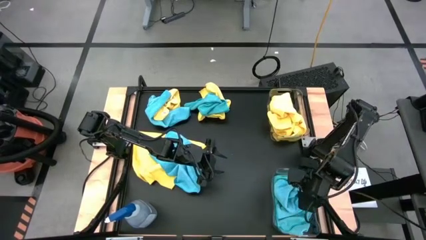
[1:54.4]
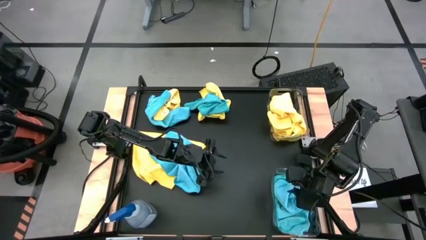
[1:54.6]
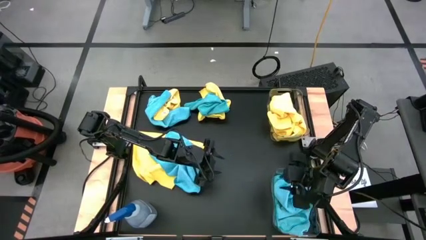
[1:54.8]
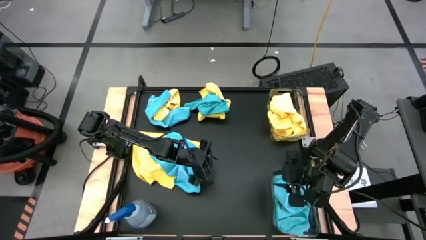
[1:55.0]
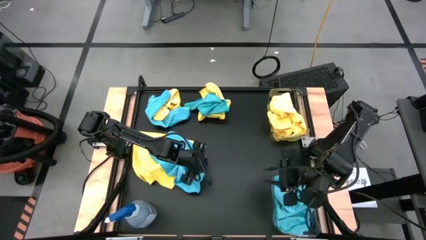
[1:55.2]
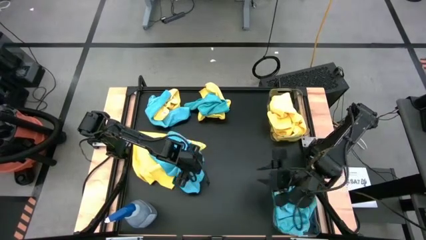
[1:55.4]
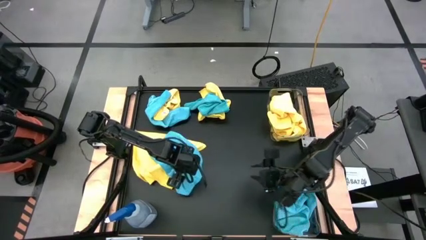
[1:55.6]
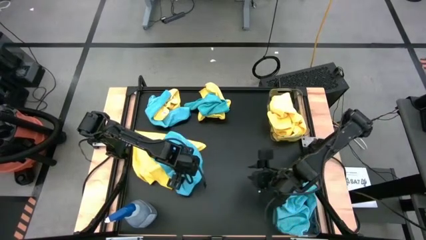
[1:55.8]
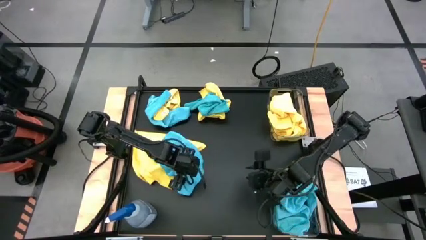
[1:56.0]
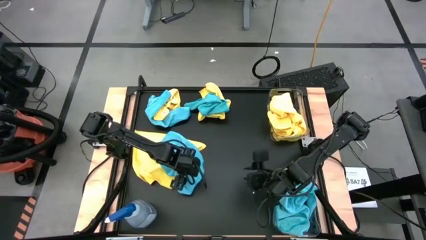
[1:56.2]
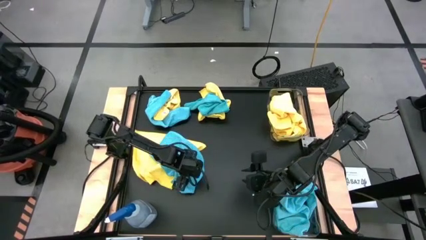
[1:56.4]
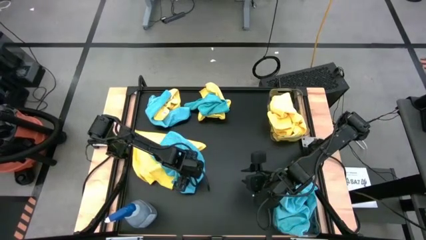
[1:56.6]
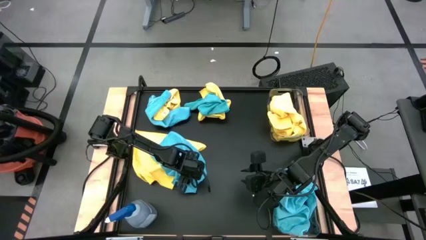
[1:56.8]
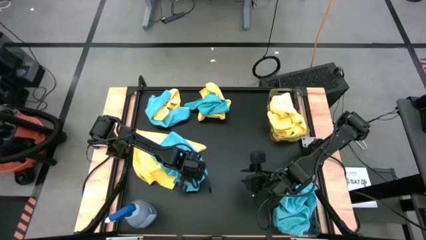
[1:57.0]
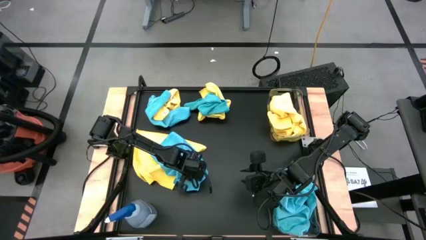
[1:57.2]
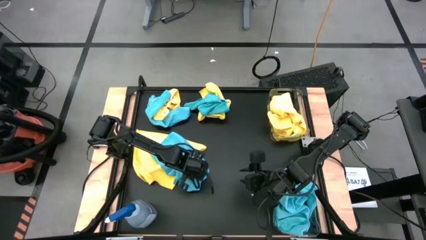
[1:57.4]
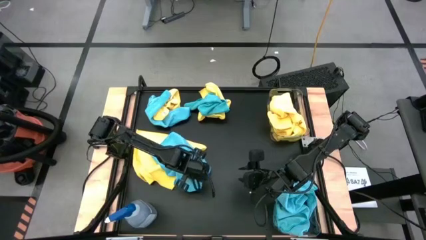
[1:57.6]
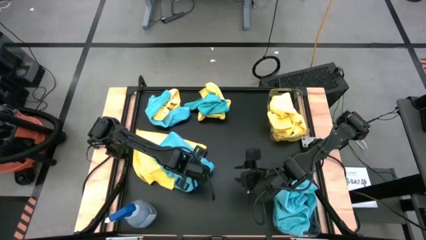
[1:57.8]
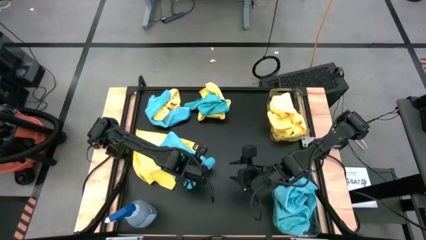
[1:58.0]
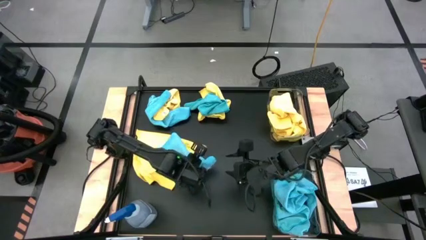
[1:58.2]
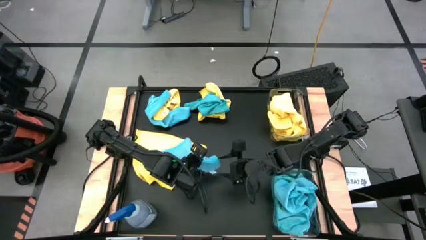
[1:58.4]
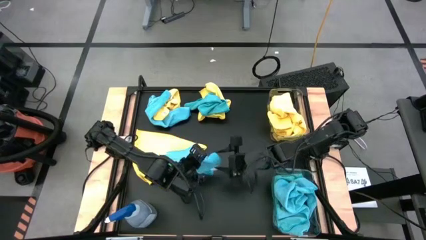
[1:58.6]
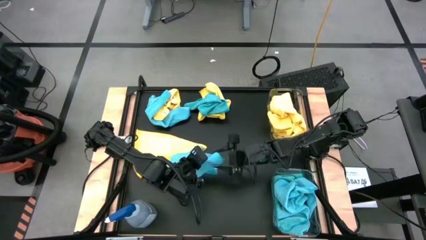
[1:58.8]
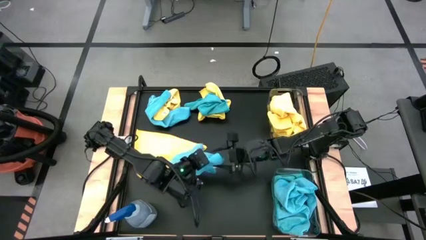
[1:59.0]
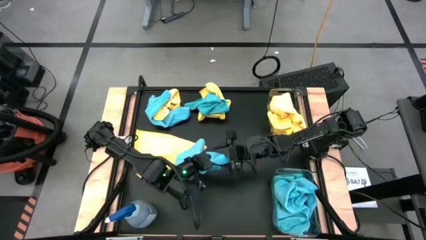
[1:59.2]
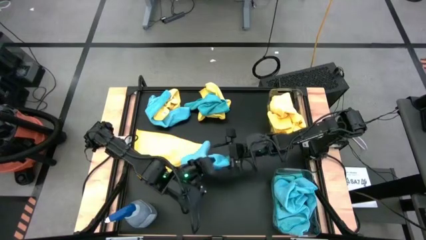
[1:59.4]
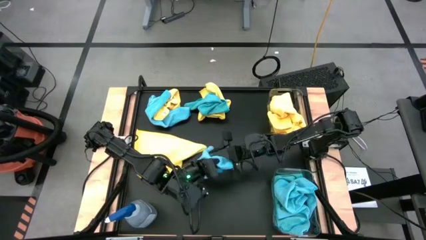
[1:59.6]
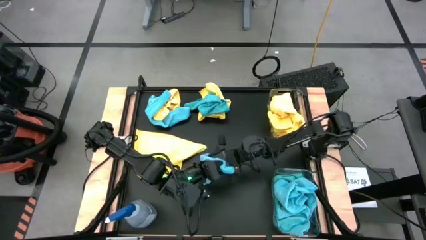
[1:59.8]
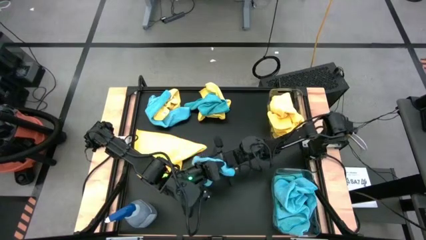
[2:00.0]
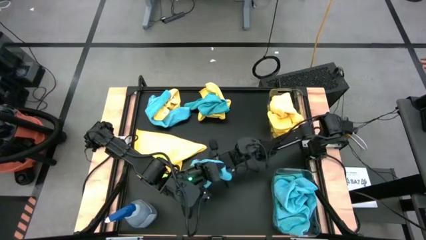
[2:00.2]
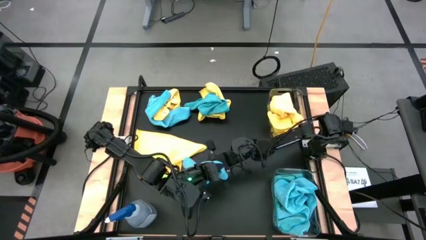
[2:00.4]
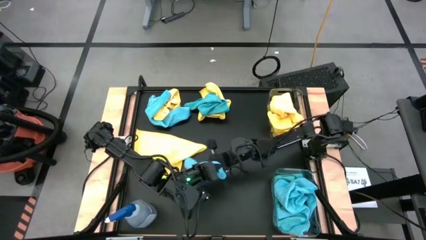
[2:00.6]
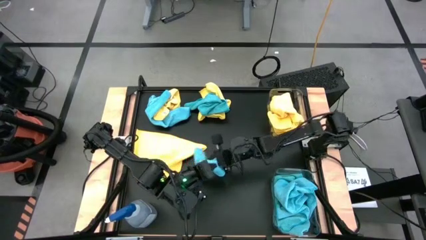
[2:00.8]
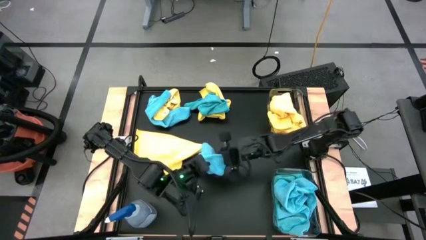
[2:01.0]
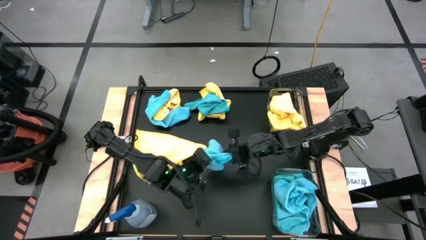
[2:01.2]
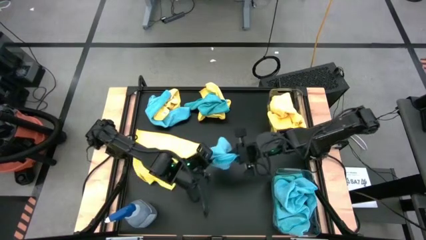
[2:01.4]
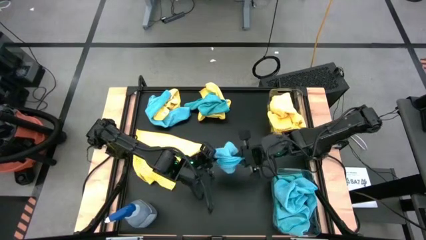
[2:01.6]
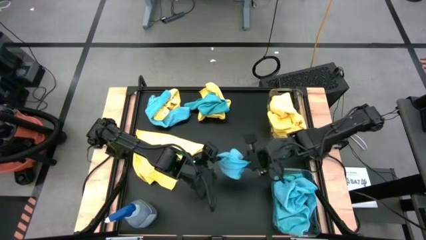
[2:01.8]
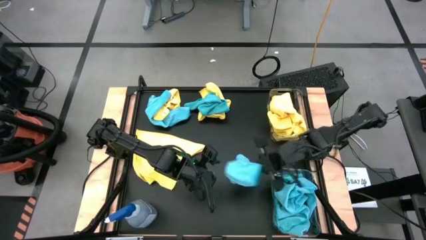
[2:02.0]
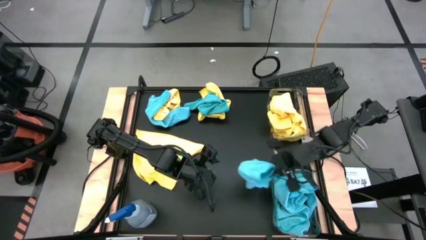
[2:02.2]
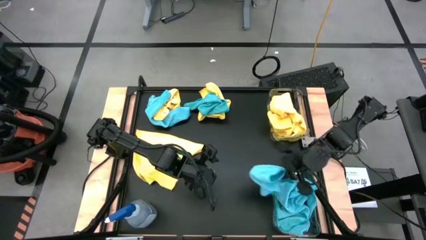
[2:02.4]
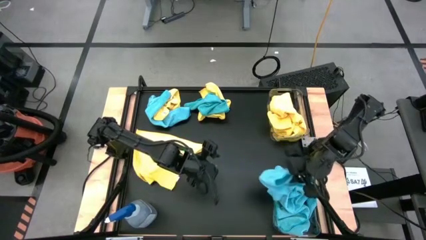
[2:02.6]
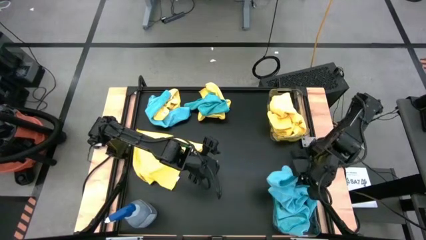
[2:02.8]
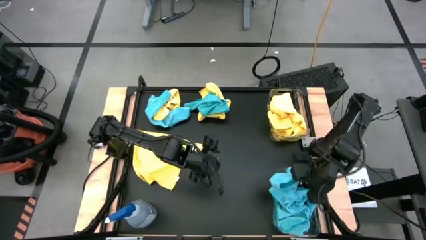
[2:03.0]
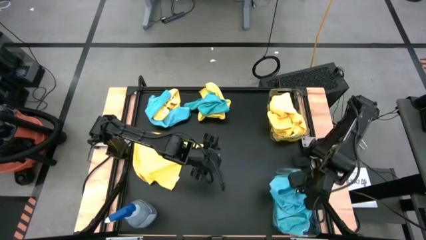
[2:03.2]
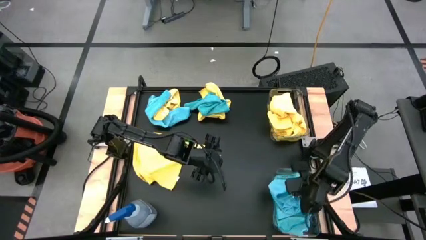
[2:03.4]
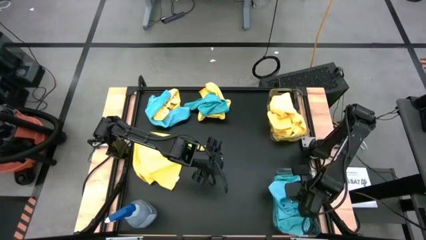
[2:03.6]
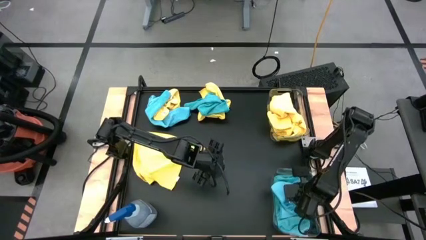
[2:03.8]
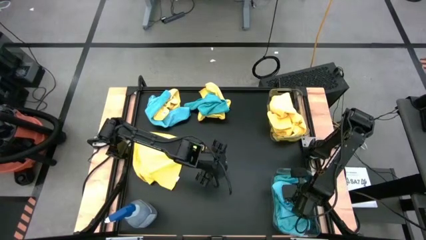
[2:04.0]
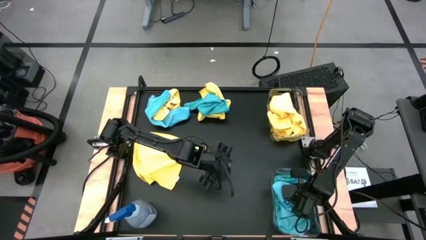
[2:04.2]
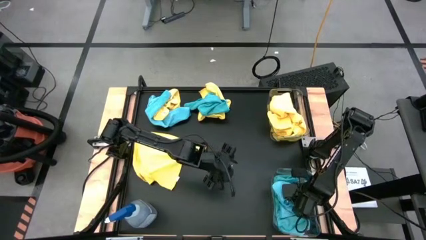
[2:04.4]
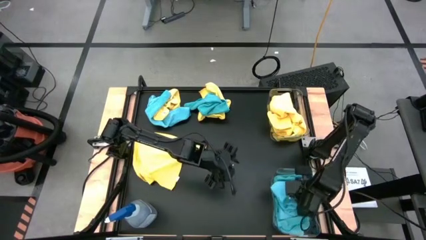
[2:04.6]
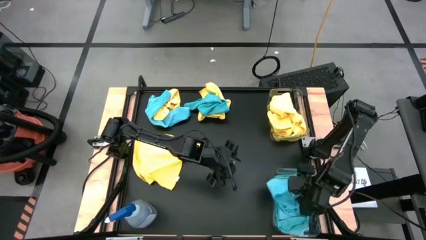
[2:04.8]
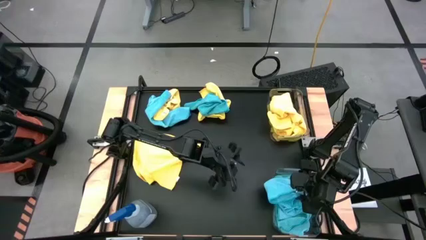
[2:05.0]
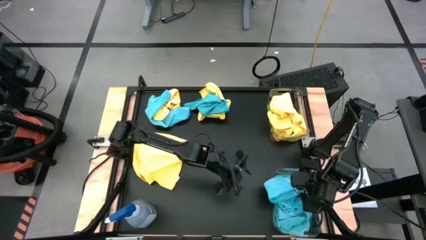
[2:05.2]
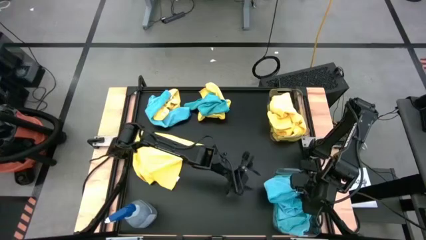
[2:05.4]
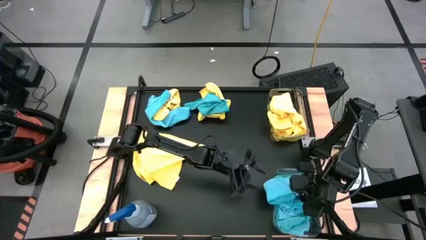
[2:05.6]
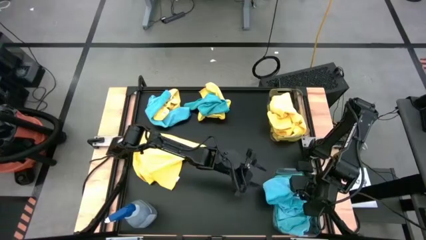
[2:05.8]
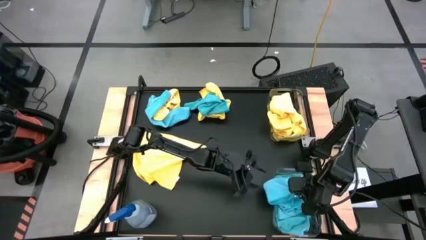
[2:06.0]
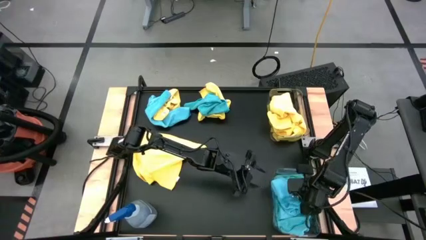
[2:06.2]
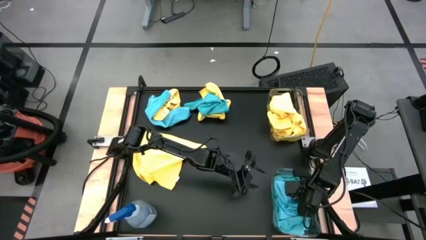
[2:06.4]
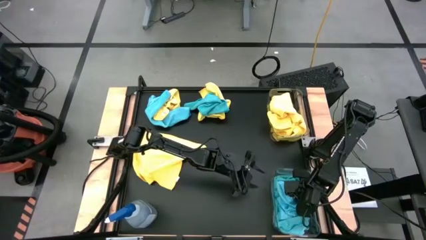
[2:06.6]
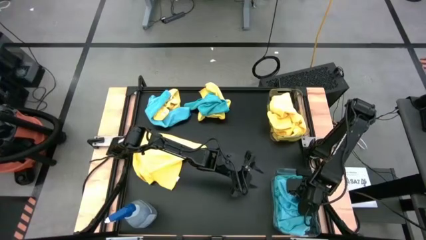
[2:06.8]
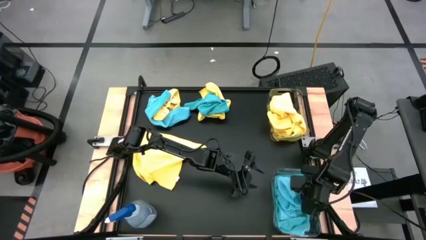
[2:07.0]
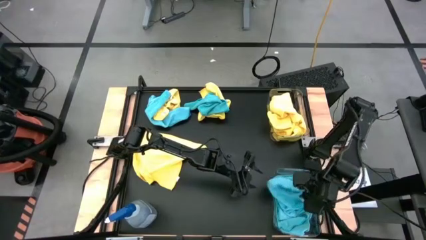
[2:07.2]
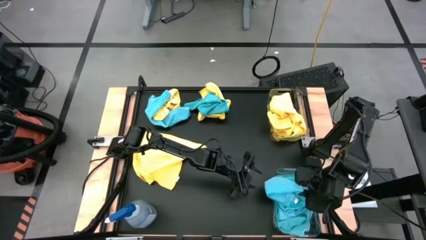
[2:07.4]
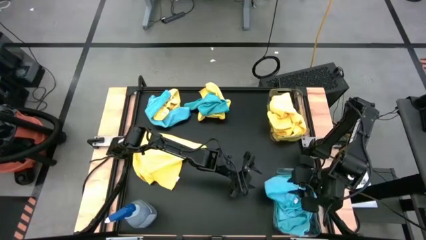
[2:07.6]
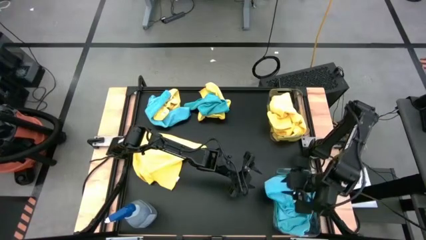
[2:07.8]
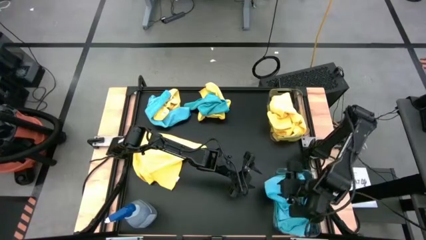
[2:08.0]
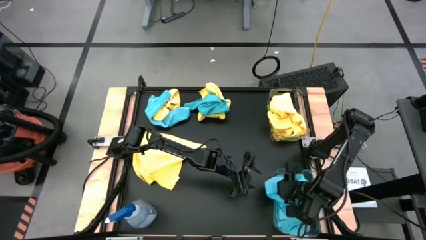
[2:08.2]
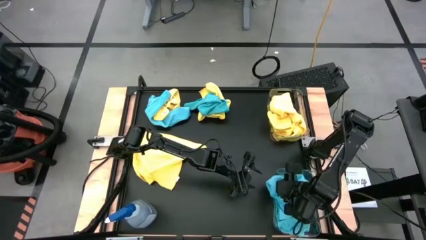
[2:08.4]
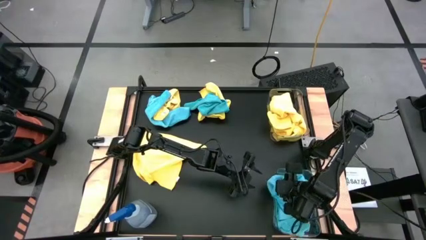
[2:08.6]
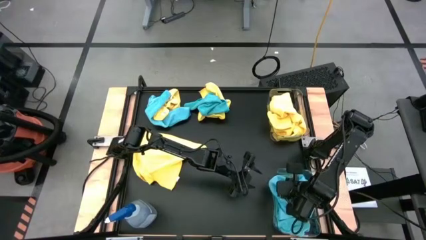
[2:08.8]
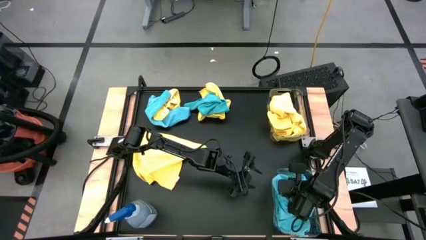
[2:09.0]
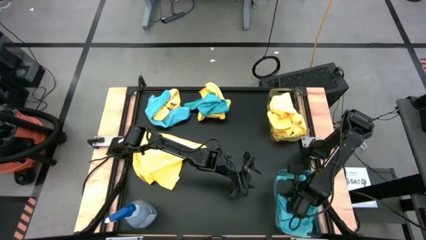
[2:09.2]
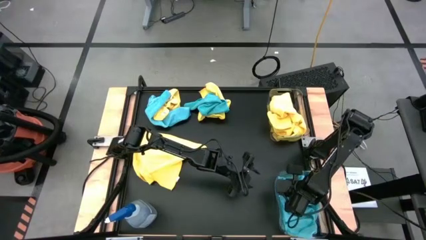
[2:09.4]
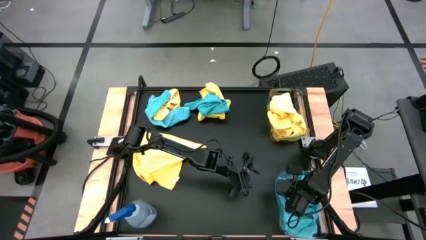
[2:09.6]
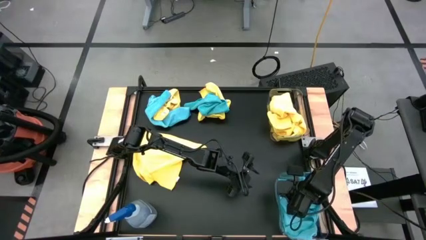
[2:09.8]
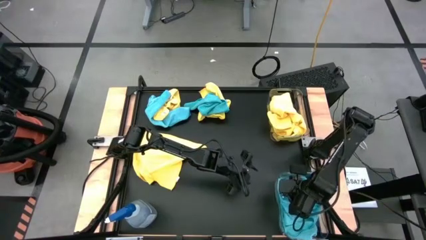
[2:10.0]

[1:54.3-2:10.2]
Task: Sort microfiber towel by color & place in baskets
Put the blue towel into the bottom transparent bin
